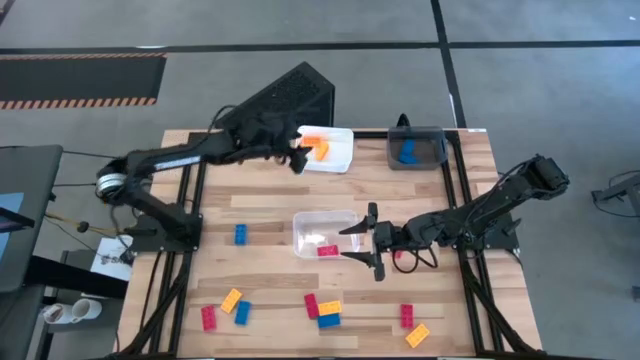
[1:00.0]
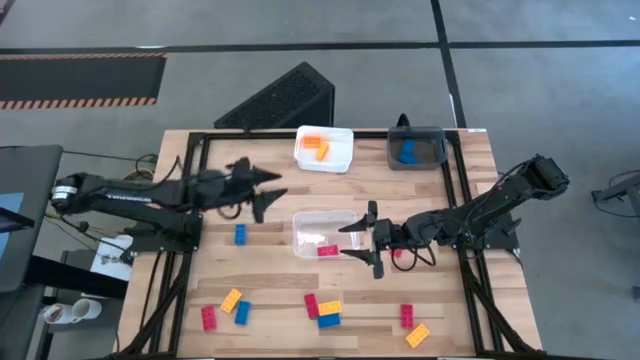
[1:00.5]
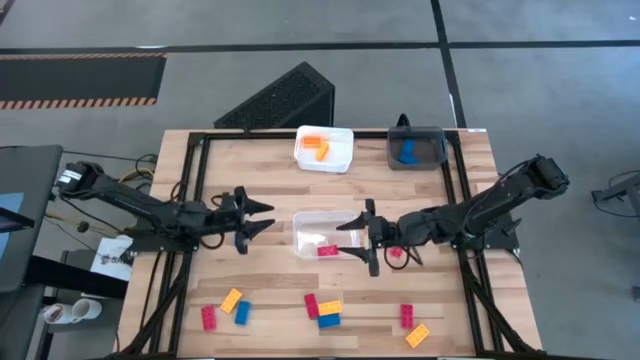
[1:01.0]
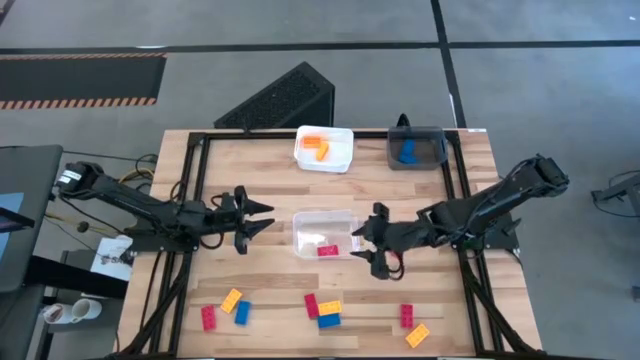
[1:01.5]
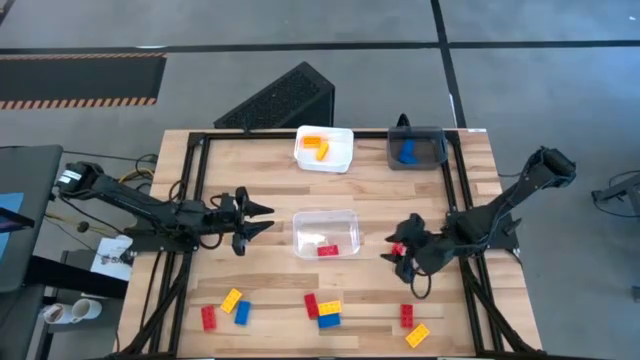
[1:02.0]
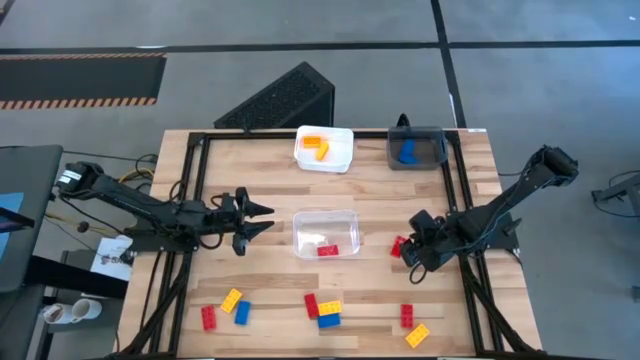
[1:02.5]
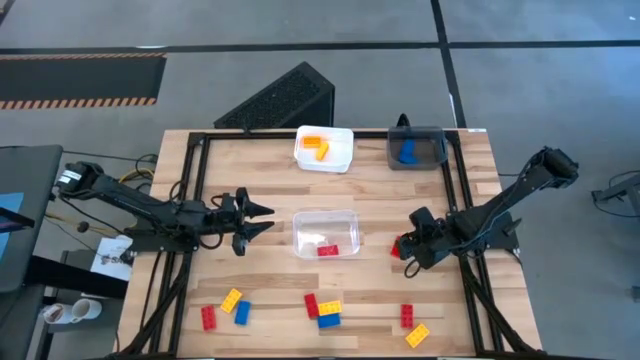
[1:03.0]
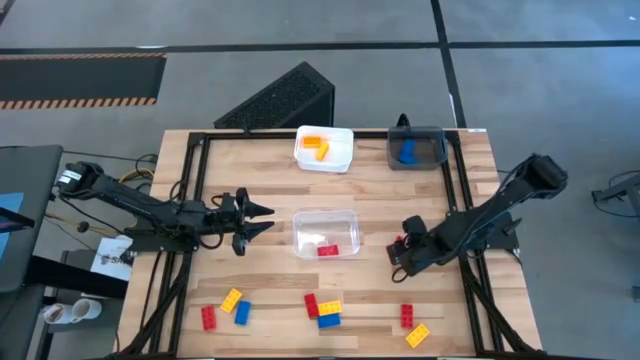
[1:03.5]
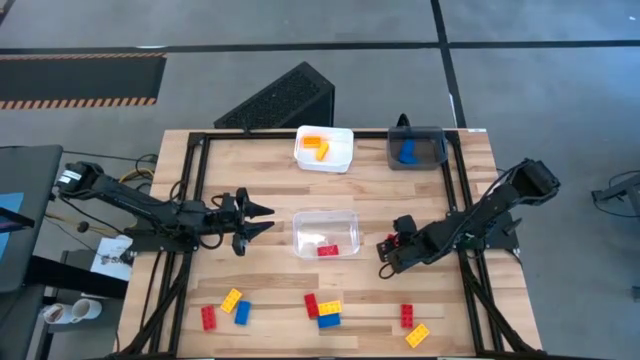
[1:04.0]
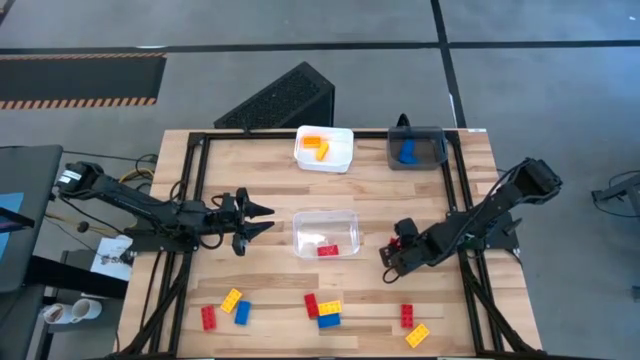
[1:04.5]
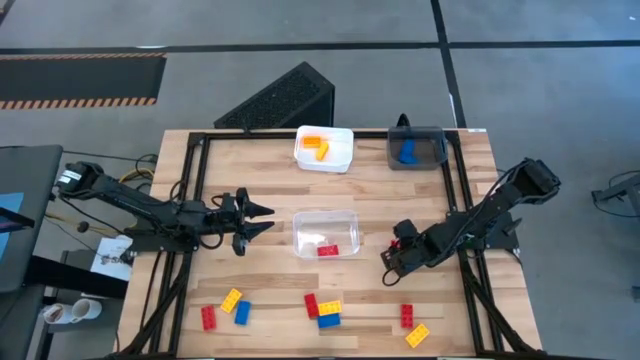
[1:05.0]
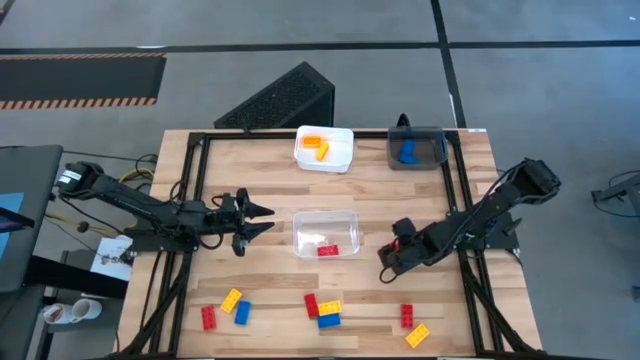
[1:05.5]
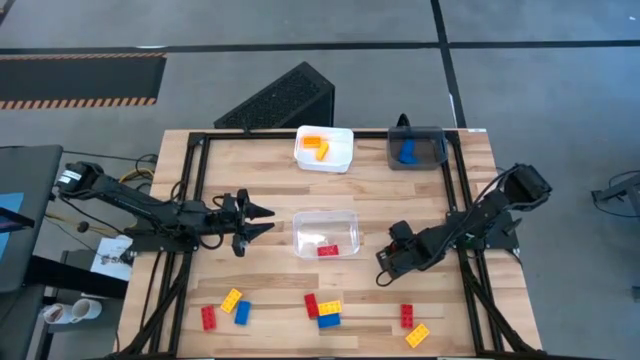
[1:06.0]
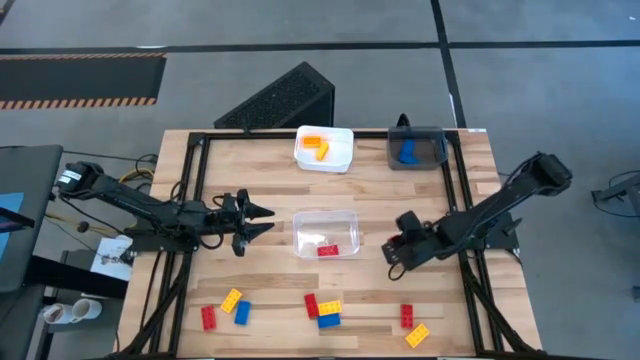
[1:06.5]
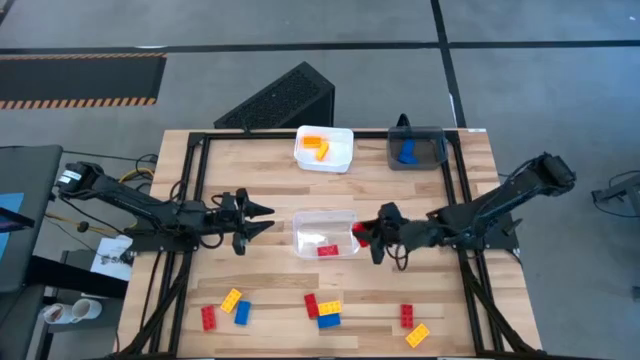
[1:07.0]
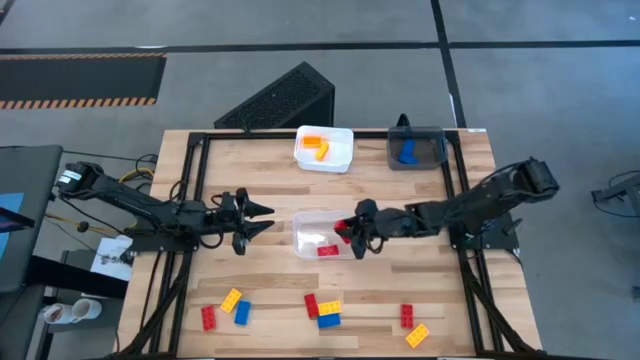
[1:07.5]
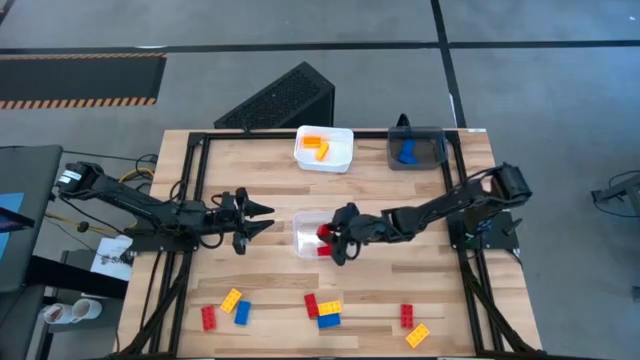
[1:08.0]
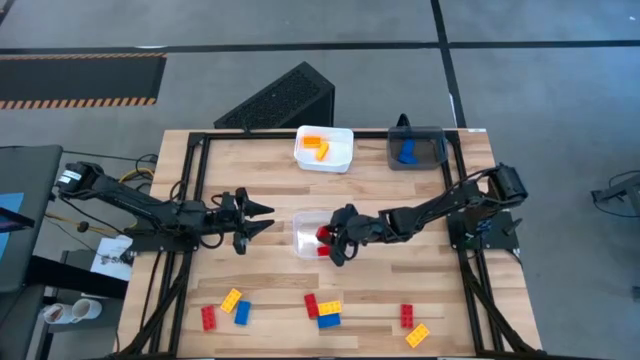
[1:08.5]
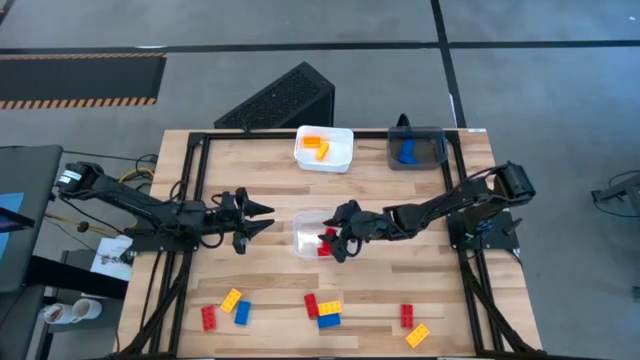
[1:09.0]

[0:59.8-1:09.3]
Task: Sort & place blocks by color
Put the red game piece into the transparent bin

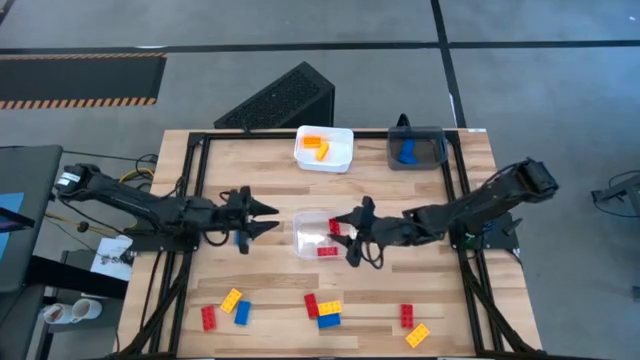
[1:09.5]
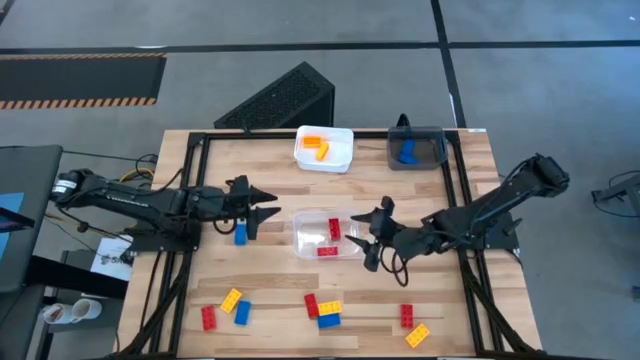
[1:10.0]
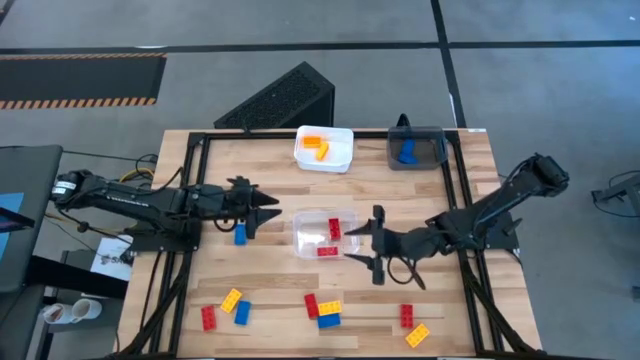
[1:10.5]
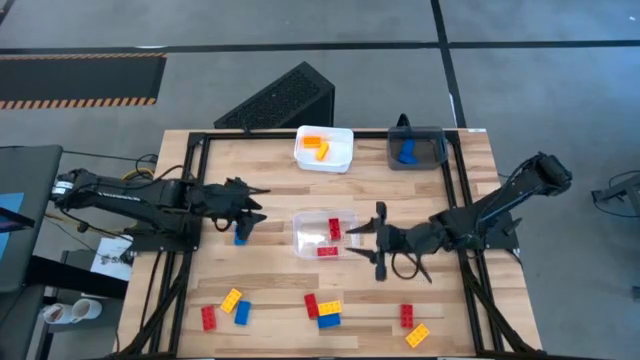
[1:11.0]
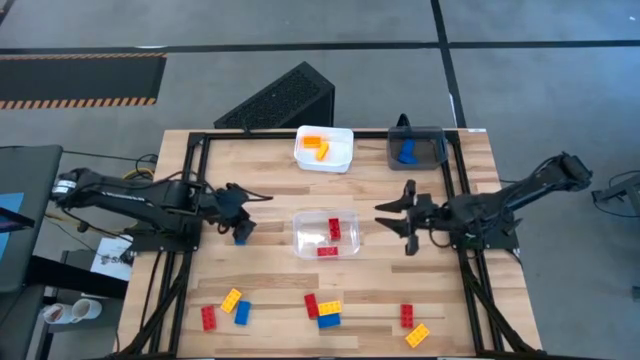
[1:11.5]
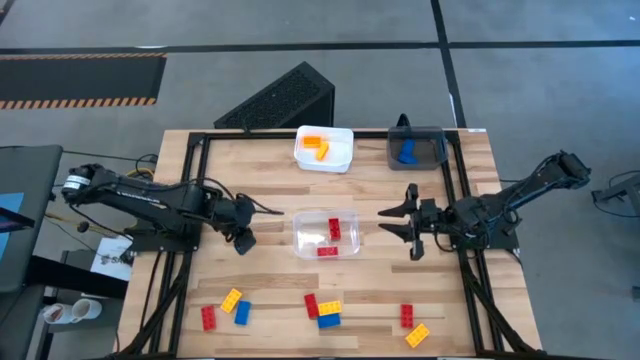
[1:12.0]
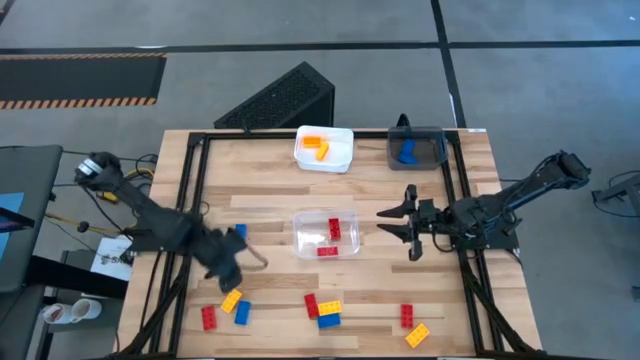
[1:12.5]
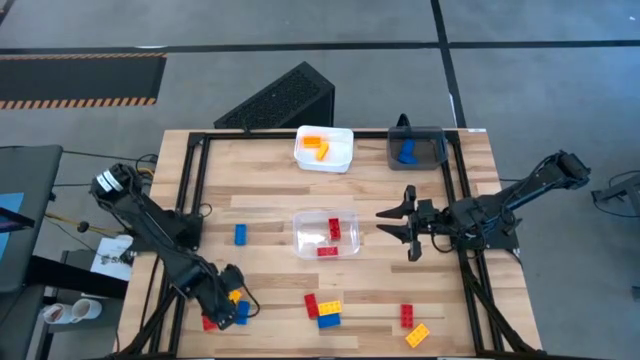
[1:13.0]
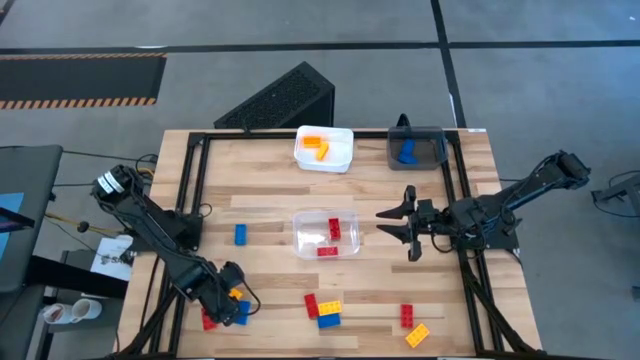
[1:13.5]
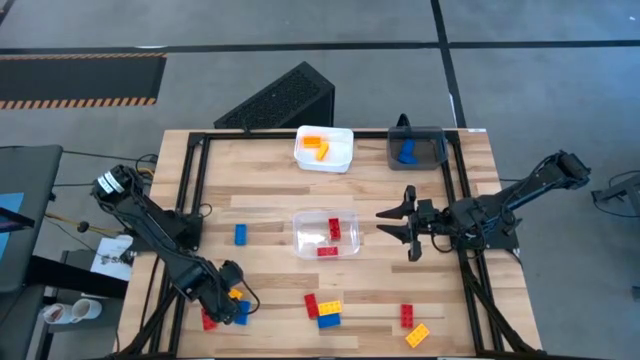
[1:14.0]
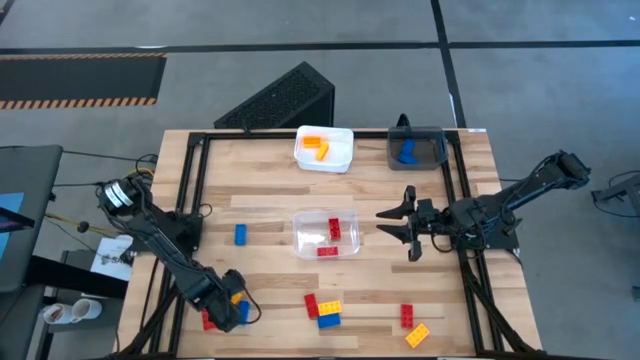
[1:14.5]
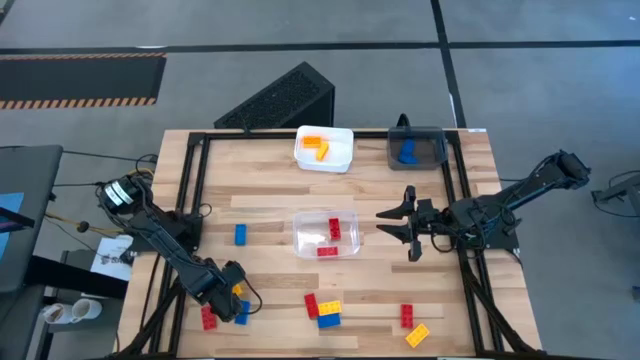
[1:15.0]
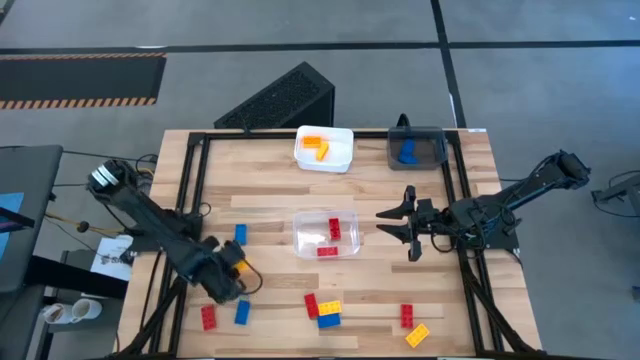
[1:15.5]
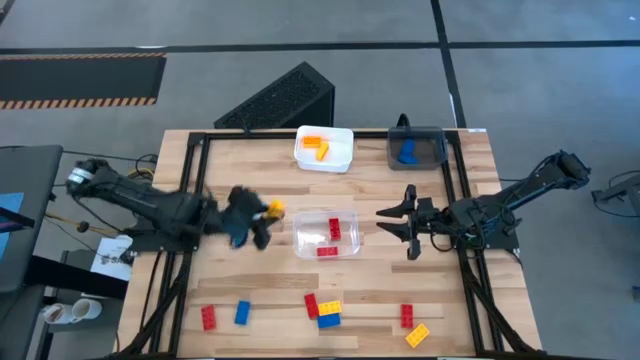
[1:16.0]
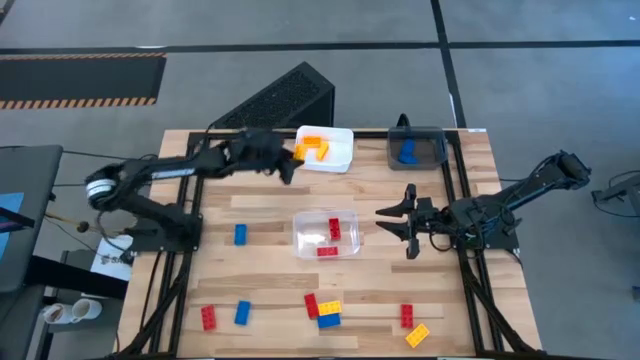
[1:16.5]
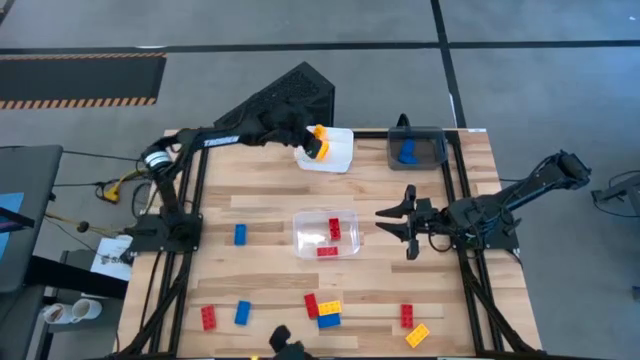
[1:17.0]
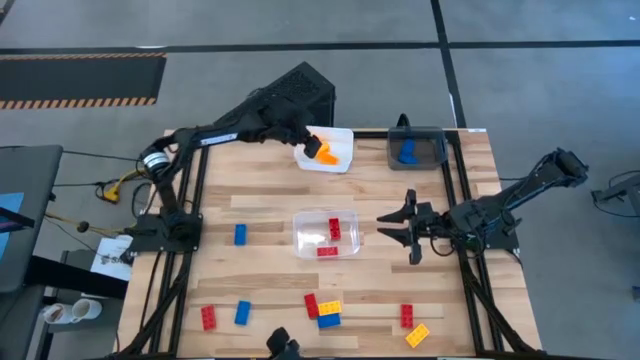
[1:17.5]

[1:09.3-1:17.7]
Put the yellow game piece into the white bin

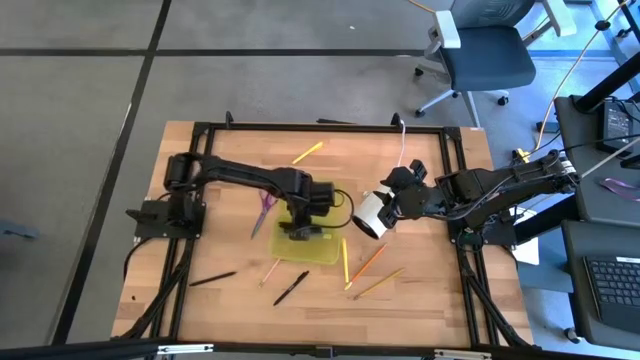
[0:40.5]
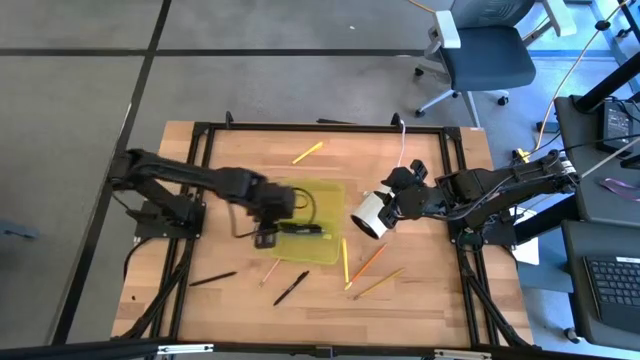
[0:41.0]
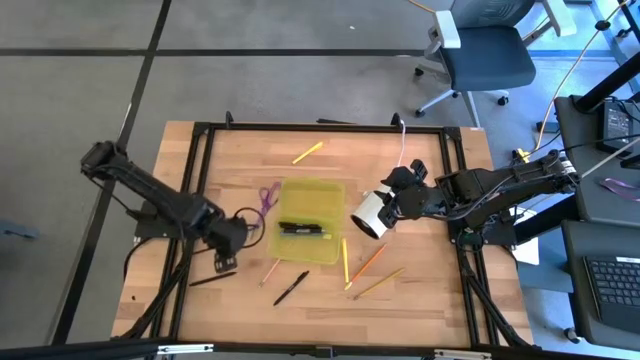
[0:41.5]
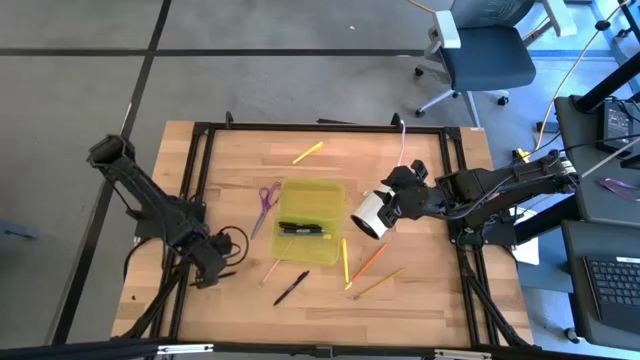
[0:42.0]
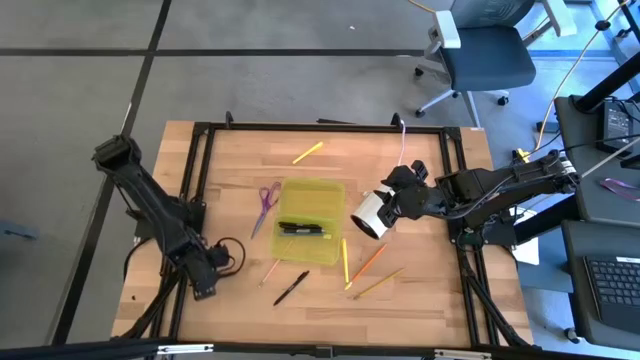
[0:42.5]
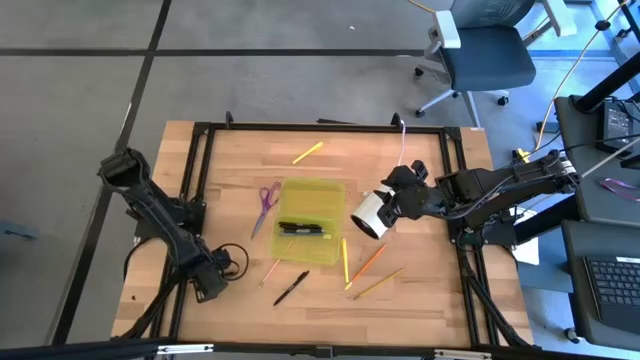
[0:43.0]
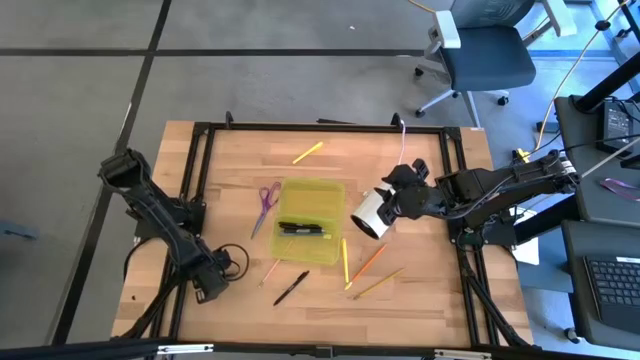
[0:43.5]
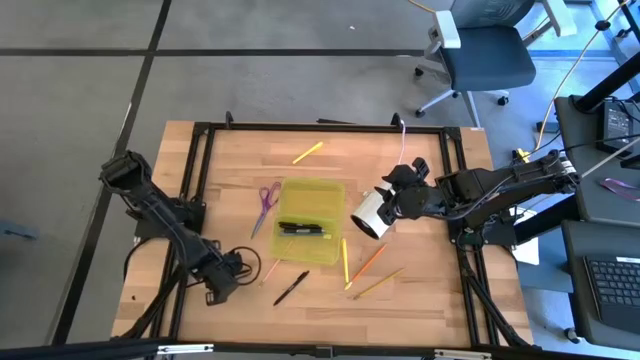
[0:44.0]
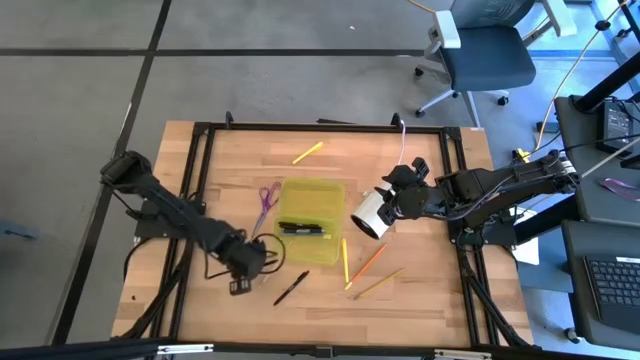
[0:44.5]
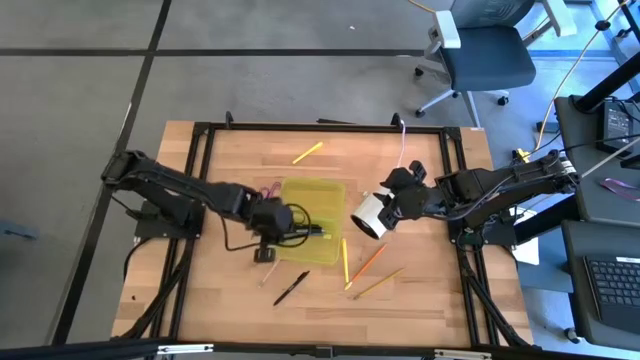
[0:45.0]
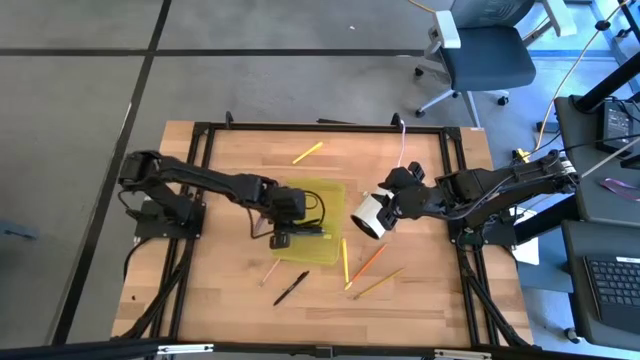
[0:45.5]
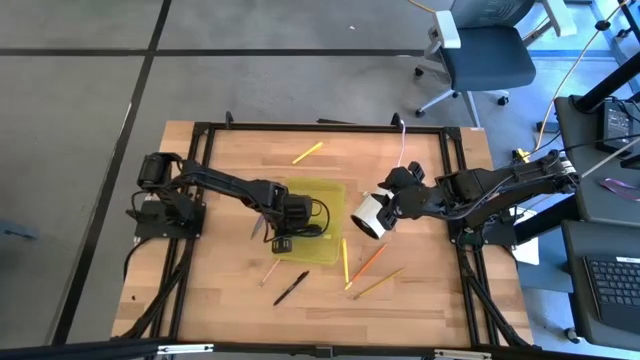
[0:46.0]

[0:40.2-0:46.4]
Task: Pick & place school supplies into a supply box
Put the black pen into the yellow supply box
